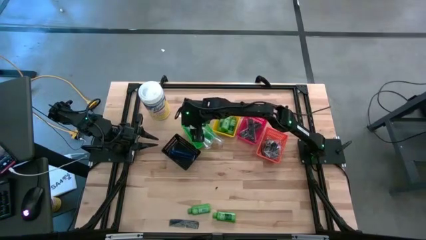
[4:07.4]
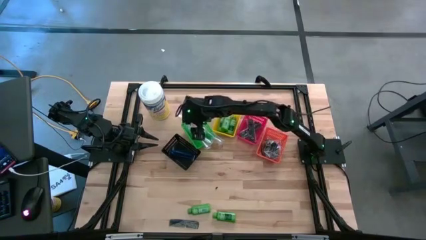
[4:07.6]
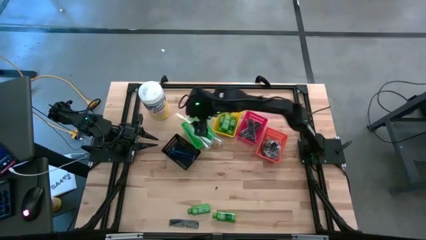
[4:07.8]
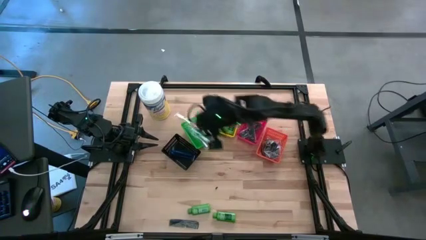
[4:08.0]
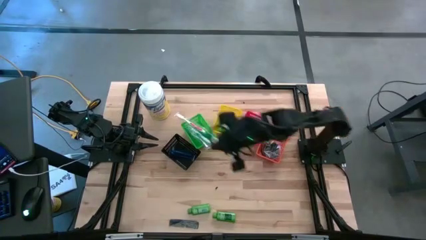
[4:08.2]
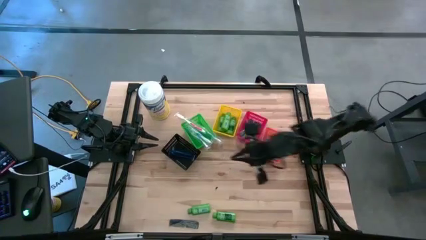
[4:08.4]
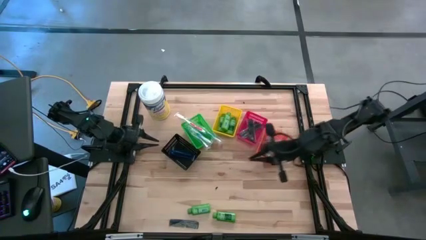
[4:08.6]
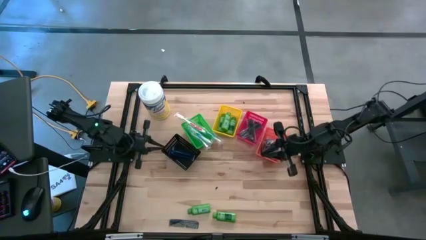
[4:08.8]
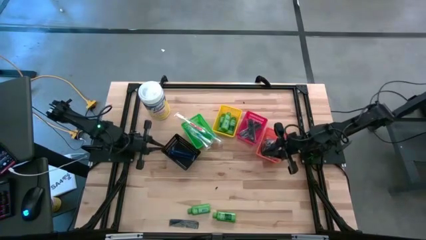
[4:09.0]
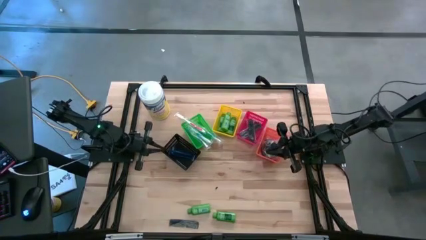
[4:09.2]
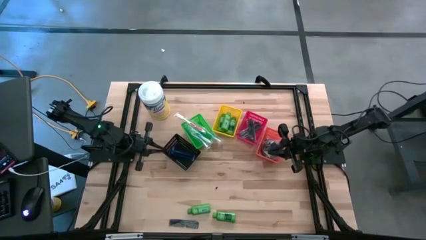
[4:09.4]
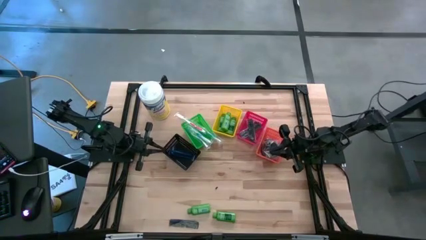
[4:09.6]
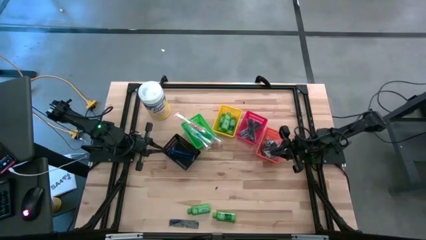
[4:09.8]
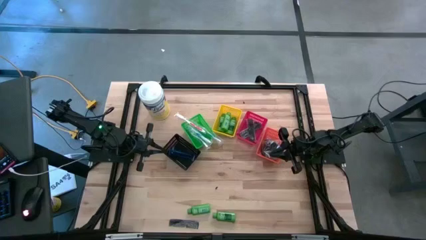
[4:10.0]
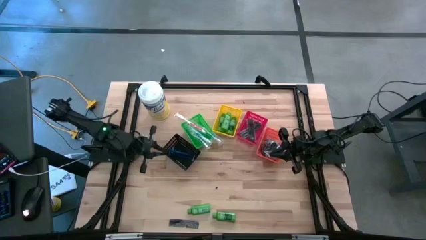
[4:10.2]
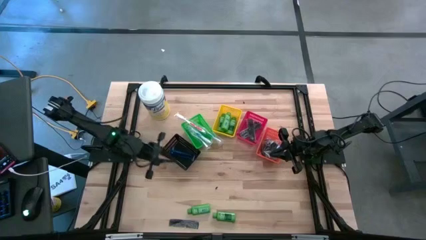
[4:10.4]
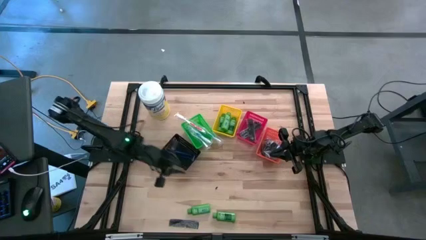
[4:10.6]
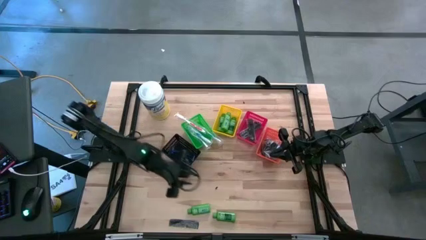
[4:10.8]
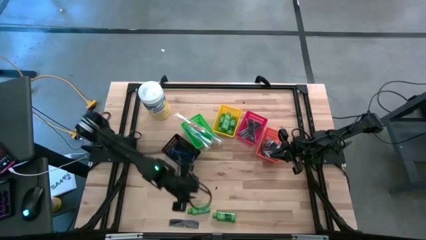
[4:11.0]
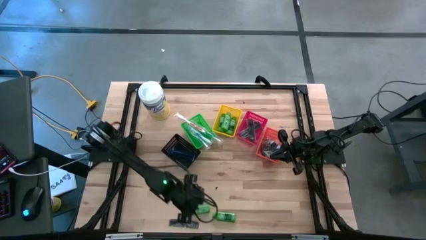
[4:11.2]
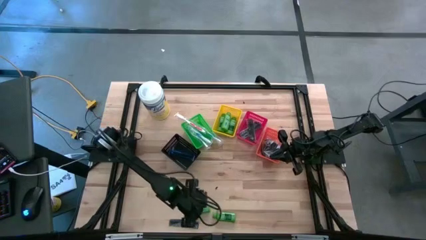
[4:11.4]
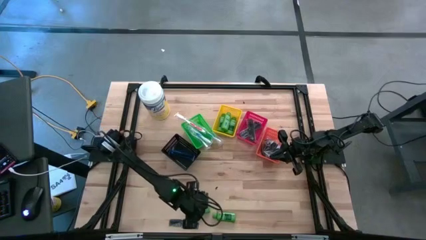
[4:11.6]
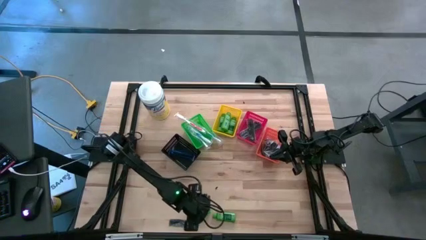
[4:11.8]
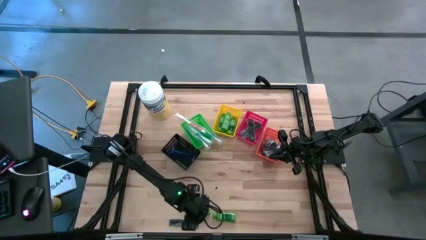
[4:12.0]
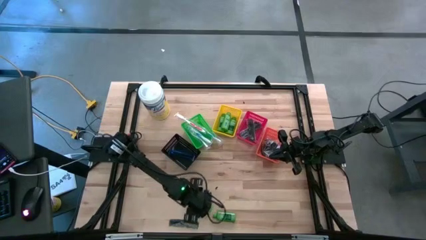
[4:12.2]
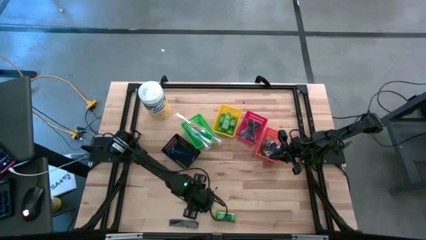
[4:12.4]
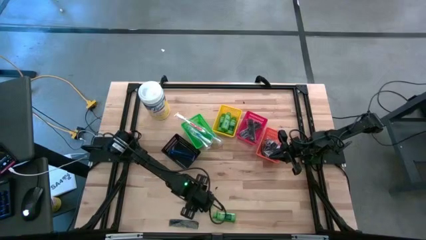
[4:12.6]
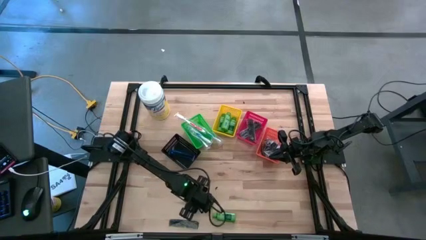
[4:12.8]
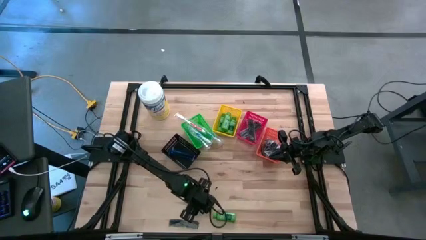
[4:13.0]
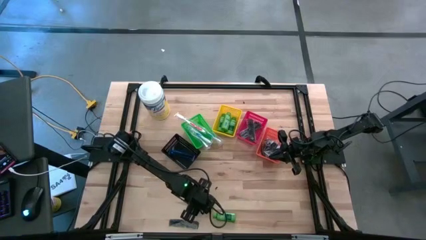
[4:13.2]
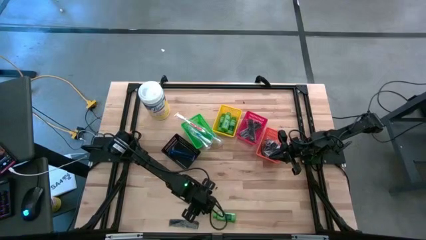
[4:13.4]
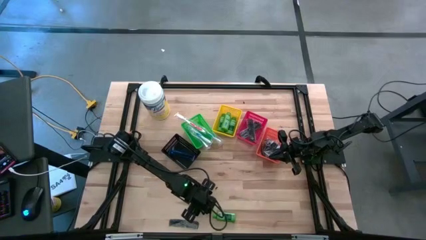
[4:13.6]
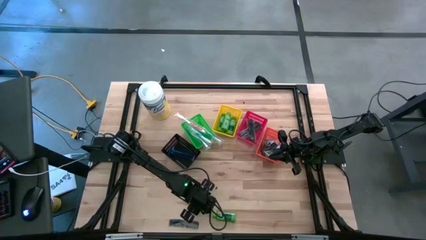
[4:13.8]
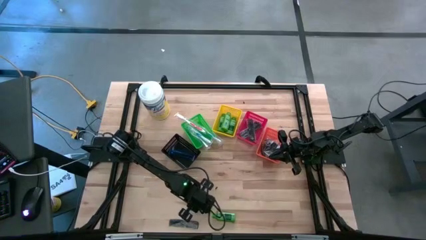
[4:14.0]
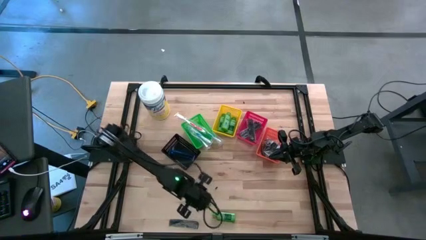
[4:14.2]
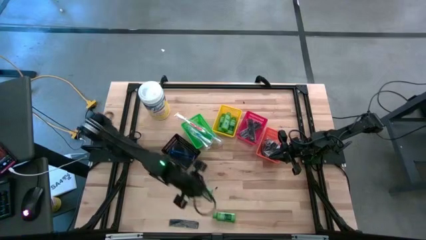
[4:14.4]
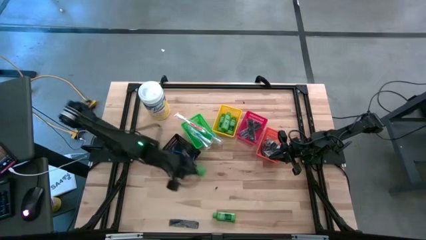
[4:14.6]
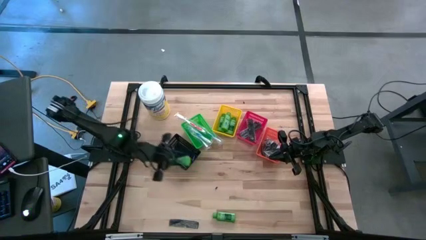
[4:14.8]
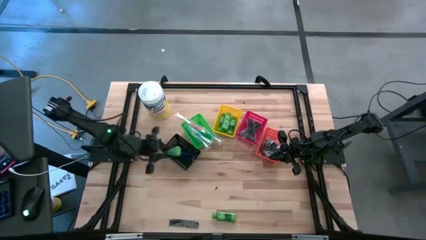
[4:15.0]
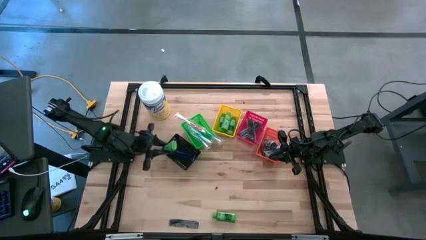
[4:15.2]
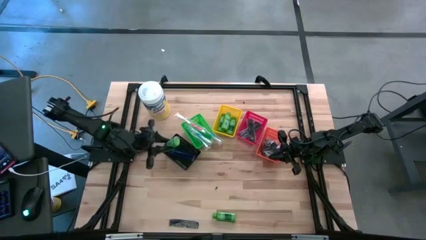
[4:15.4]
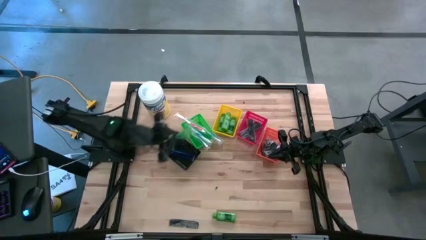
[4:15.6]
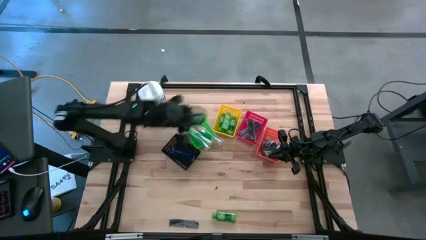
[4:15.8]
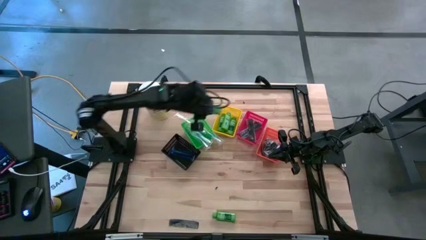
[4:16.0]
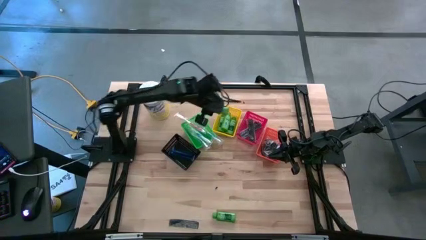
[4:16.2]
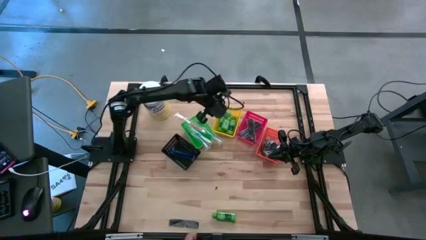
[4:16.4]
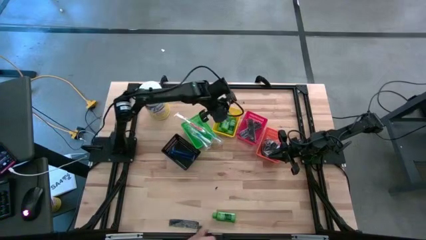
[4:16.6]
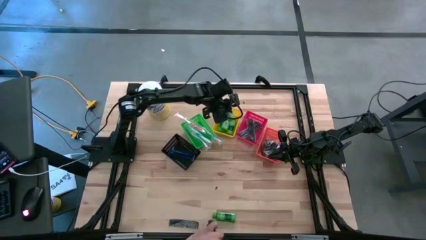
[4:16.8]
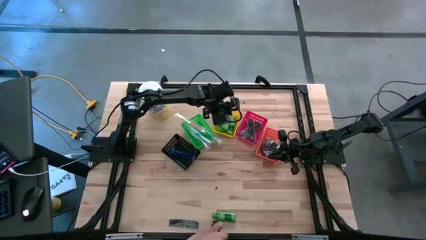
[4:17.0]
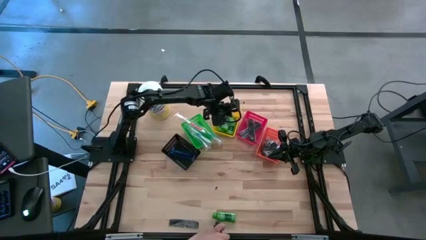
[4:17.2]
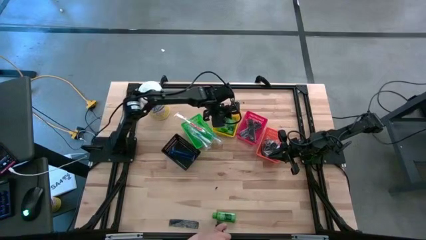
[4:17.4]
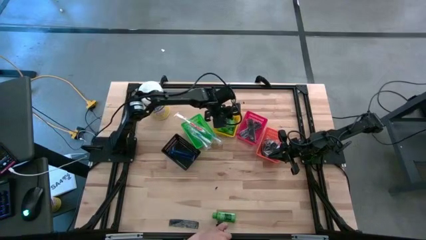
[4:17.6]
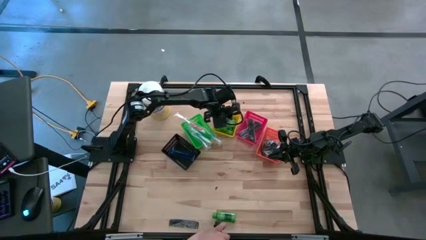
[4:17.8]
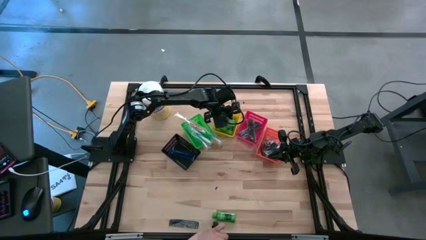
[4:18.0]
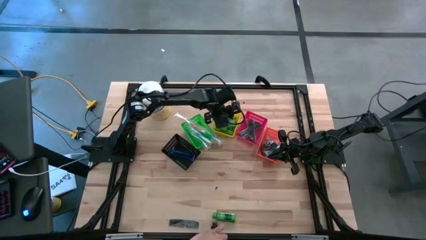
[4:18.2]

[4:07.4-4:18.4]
Task: Pick & Place Travel size toiletries
Put the green shampoo into the yellow bin

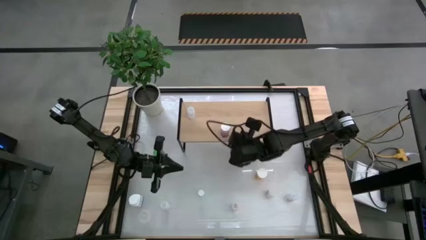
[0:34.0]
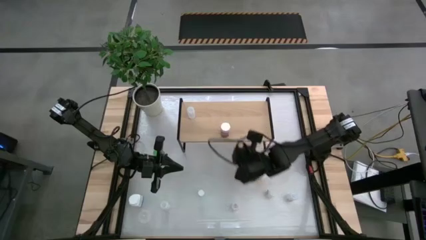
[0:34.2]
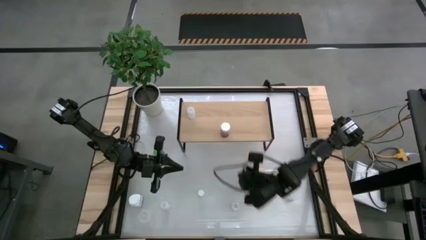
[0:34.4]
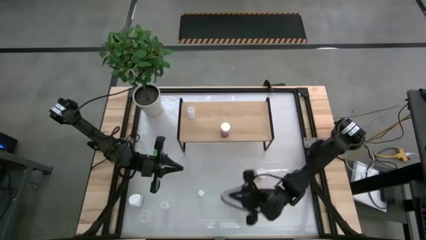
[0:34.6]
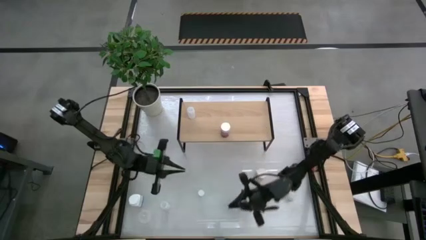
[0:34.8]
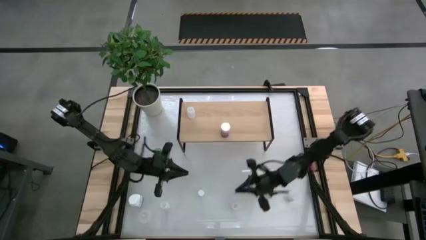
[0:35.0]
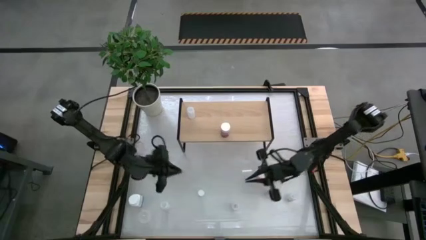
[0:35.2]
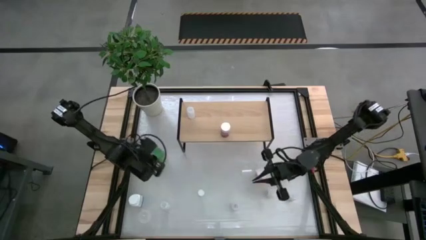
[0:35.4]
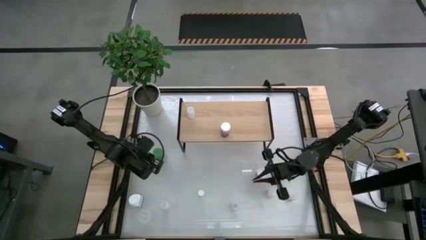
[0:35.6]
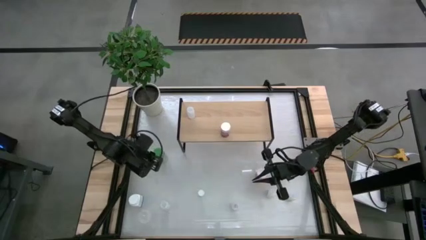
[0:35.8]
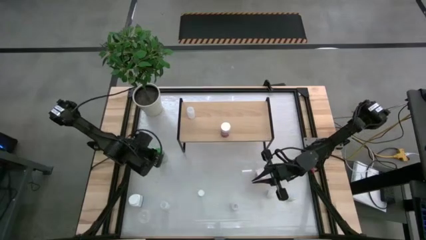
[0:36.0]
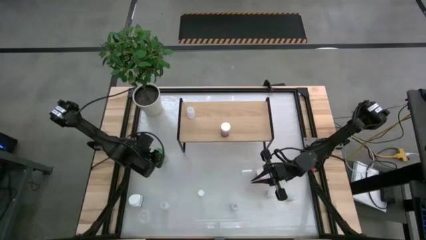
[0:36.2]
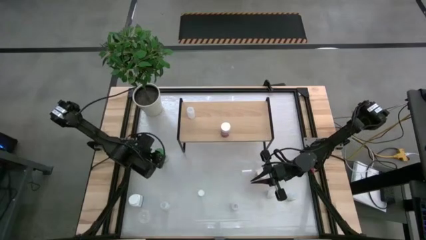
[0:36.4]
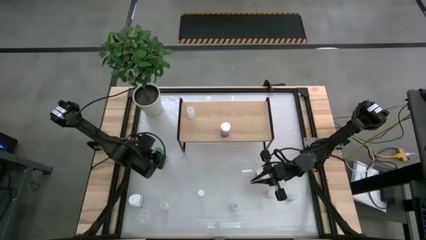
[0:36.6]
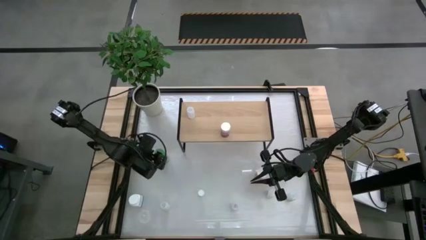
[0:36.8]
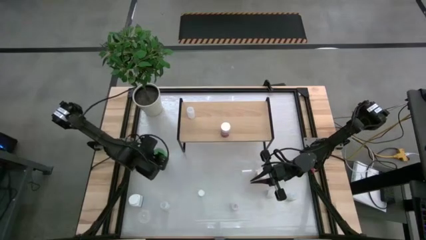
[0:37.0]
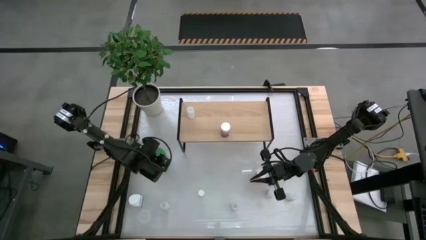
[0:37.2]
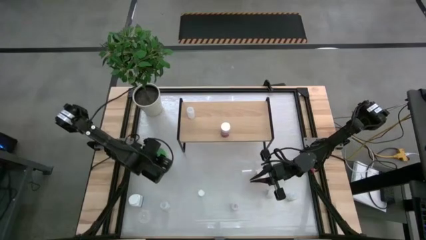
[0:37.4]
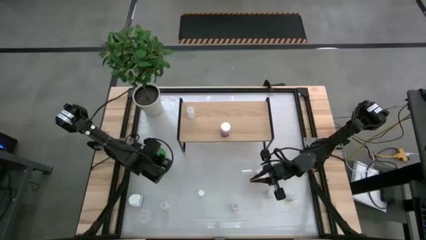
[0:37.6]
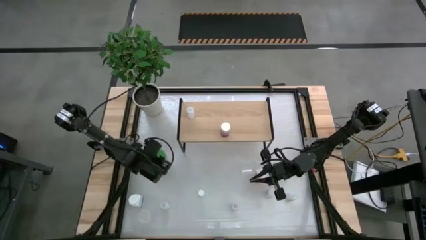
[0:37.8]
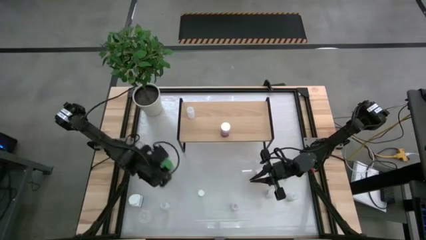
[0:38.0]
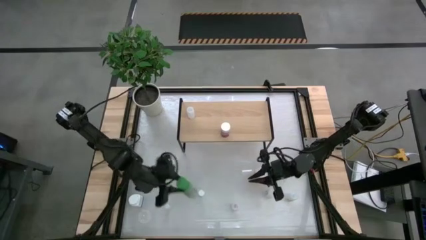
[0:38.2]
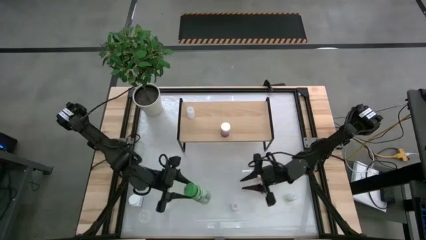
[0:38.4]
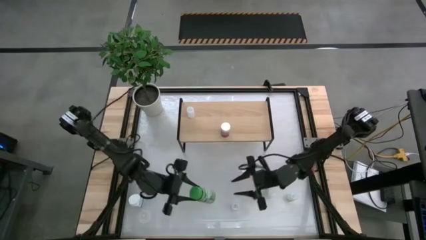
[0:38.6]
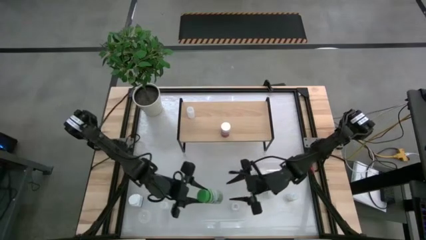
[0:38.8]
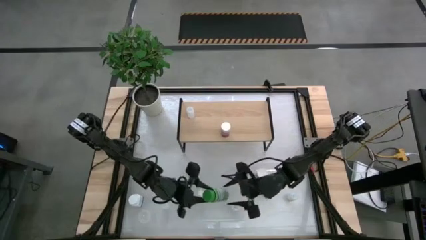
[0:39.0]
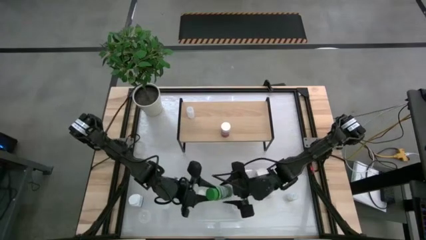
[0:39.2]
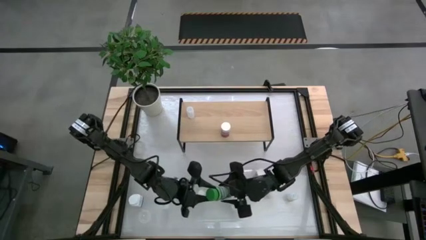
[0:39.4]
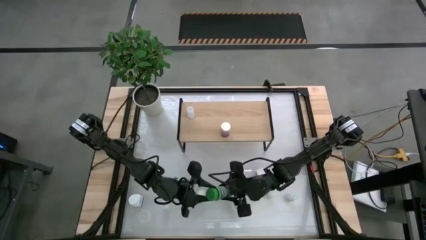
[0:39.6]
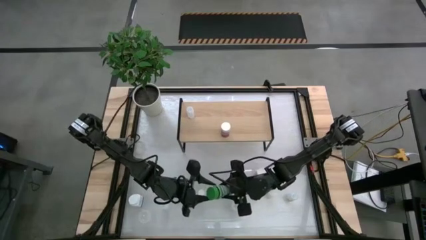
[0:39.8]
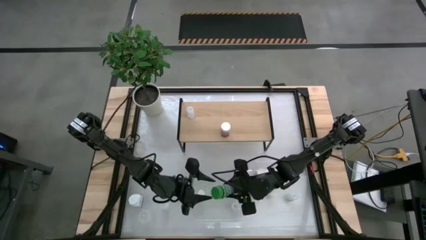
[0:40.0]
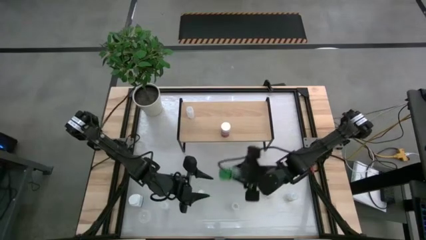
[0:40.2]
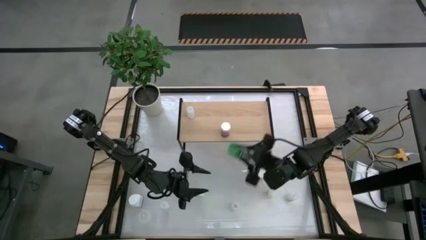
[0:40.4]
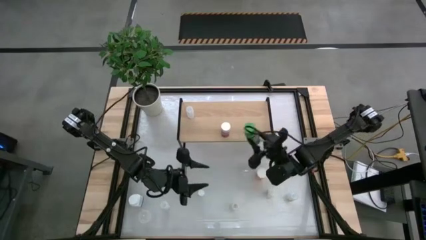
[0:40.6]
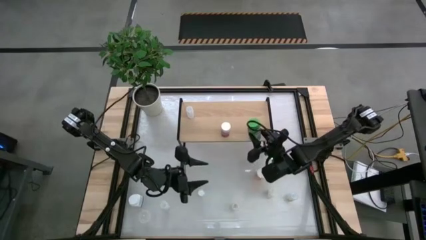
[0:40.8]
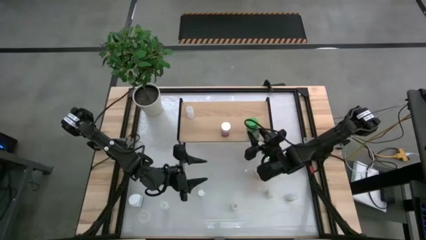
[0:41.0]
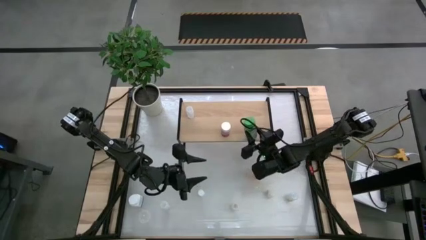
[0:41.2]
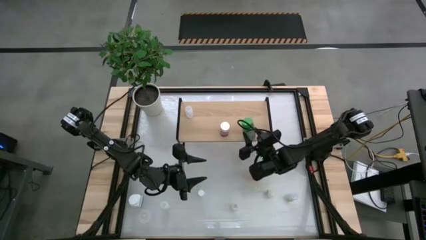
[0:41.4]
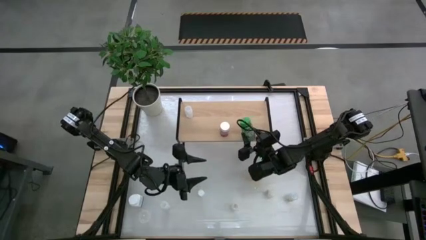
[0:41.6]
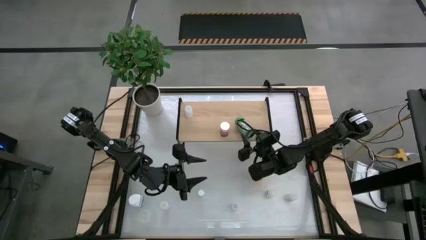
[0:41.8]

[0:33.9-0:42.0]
Task: Pick and place medicine bottles onto shelf by color
Put the green pill bottle on the shelf
